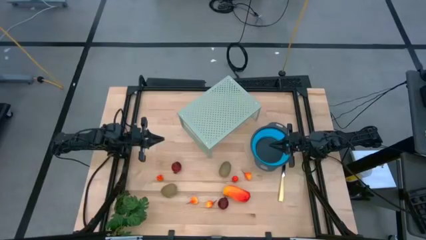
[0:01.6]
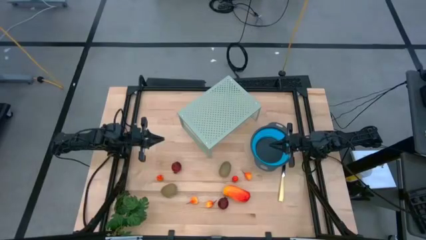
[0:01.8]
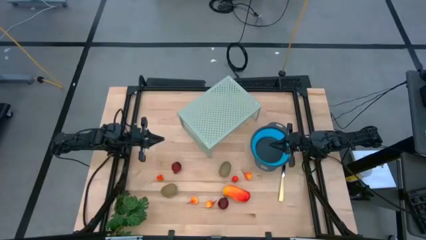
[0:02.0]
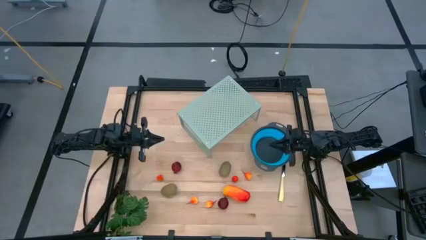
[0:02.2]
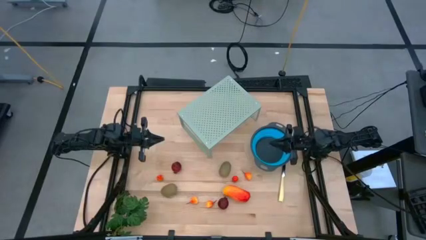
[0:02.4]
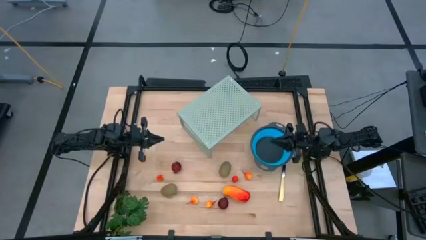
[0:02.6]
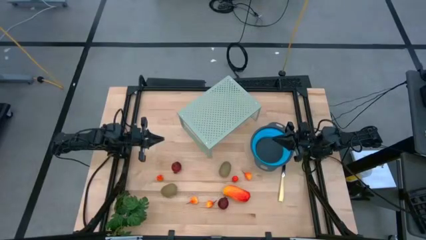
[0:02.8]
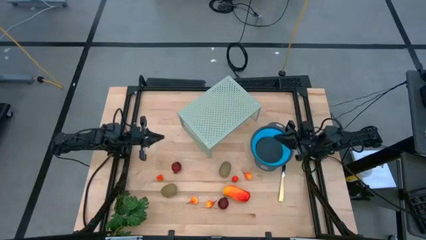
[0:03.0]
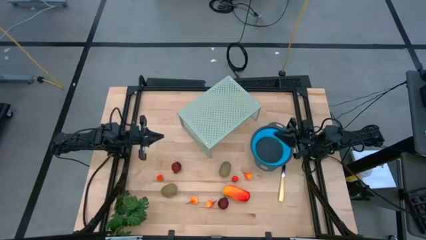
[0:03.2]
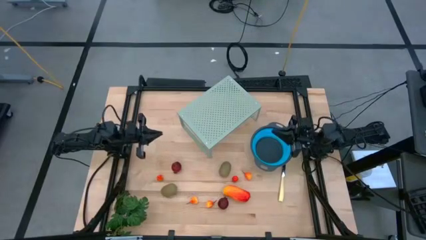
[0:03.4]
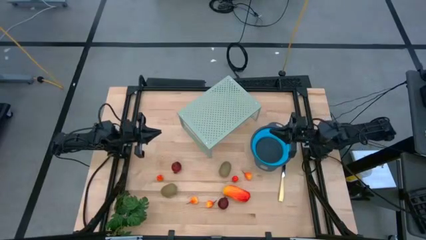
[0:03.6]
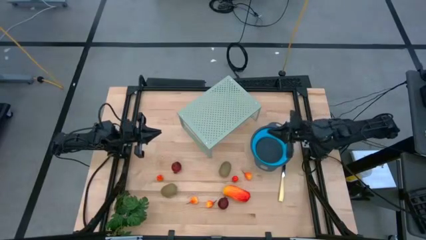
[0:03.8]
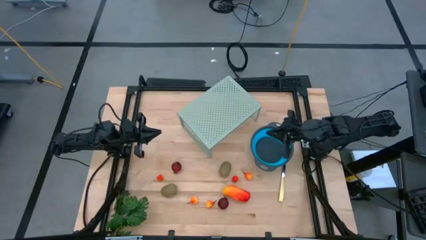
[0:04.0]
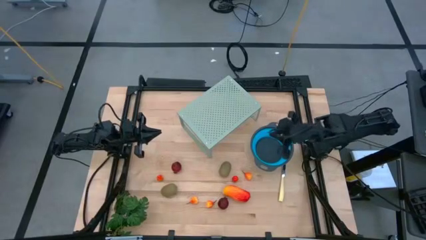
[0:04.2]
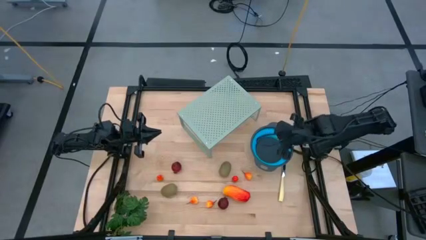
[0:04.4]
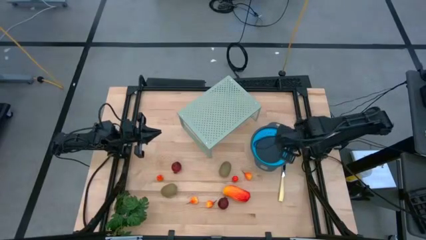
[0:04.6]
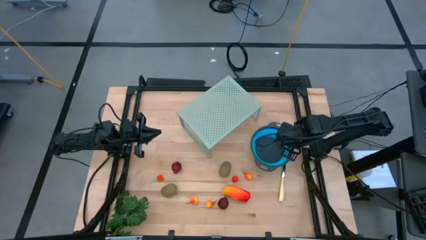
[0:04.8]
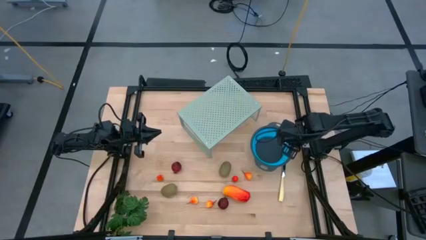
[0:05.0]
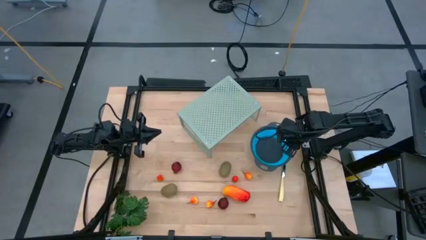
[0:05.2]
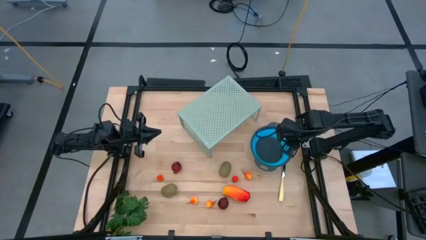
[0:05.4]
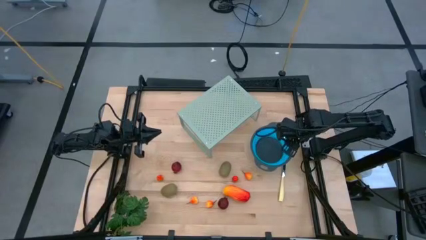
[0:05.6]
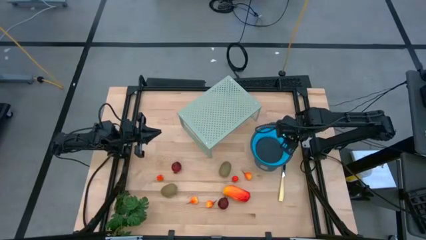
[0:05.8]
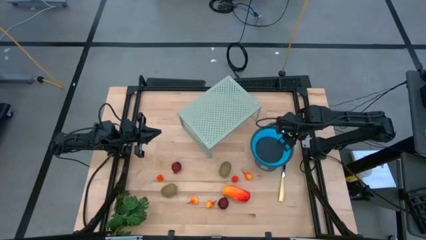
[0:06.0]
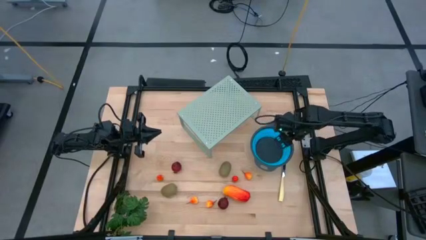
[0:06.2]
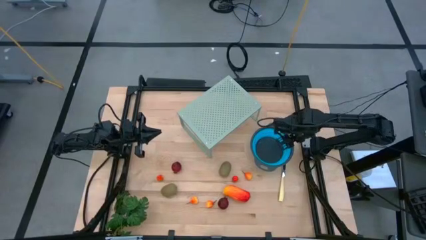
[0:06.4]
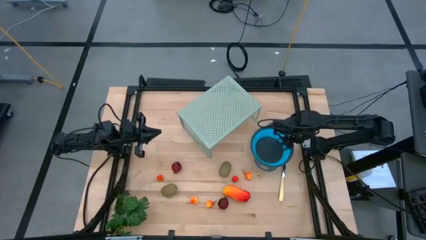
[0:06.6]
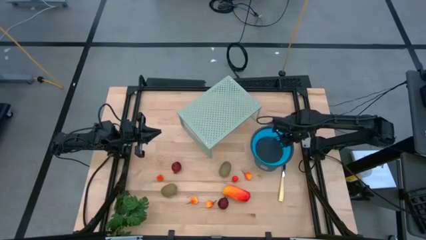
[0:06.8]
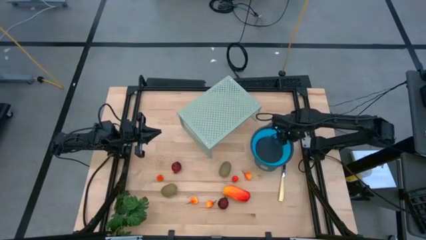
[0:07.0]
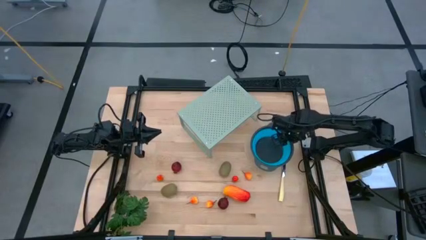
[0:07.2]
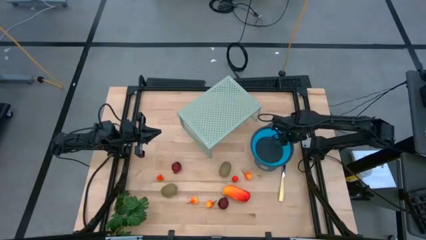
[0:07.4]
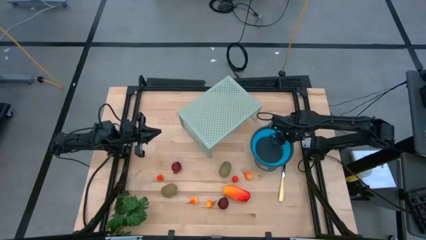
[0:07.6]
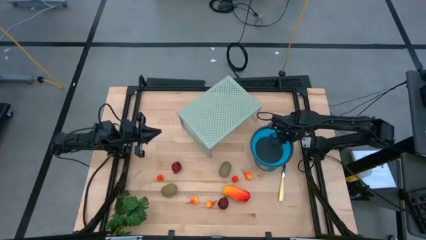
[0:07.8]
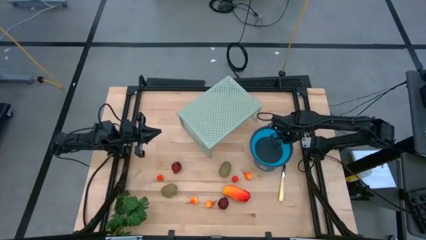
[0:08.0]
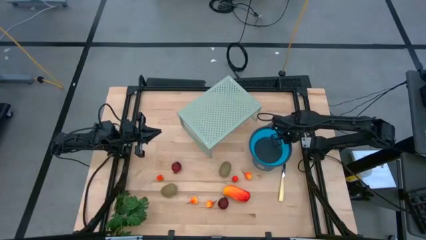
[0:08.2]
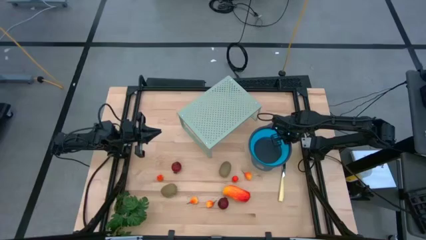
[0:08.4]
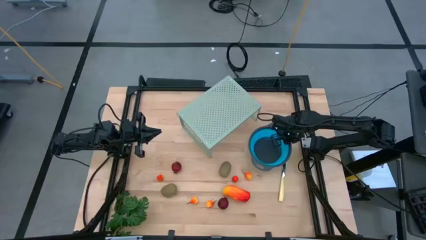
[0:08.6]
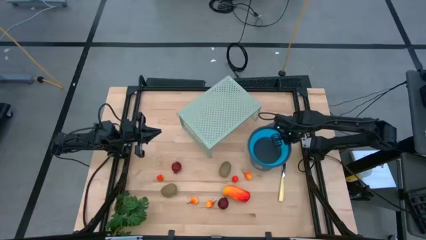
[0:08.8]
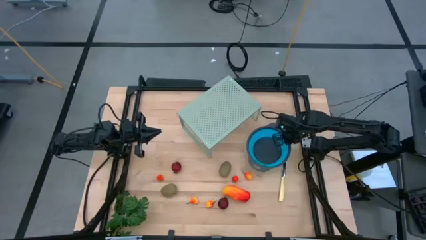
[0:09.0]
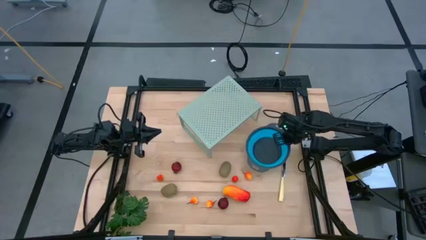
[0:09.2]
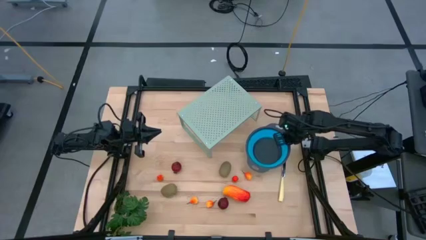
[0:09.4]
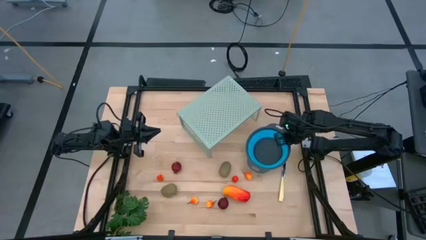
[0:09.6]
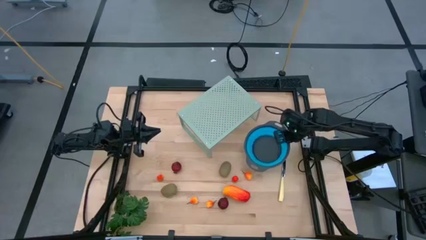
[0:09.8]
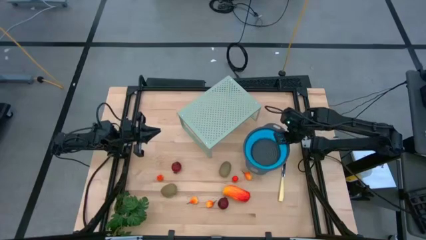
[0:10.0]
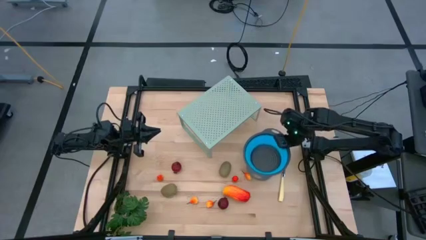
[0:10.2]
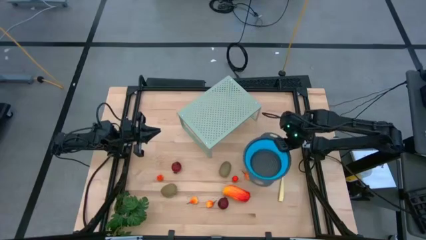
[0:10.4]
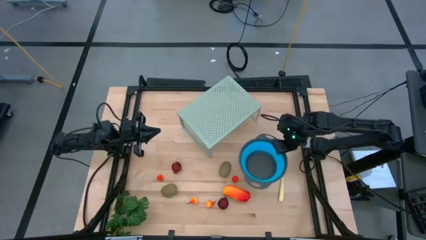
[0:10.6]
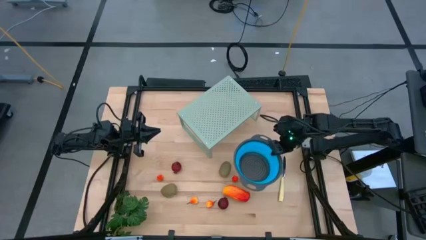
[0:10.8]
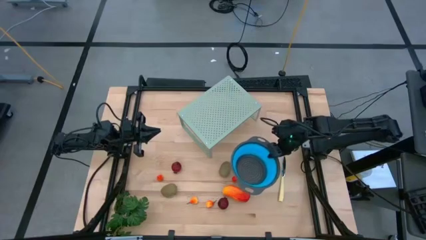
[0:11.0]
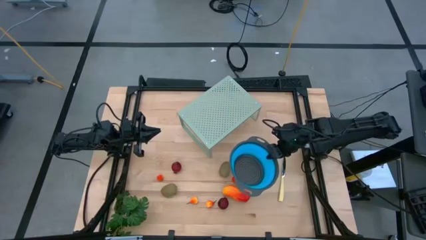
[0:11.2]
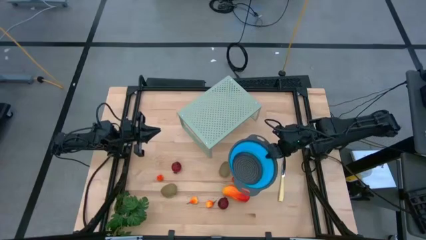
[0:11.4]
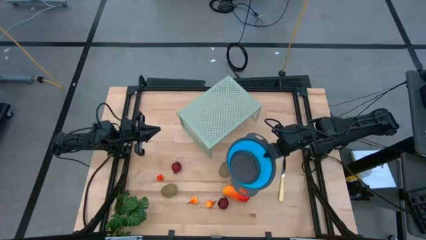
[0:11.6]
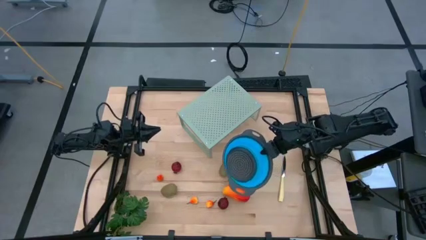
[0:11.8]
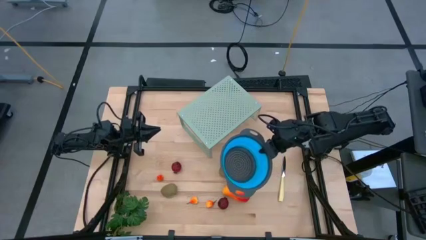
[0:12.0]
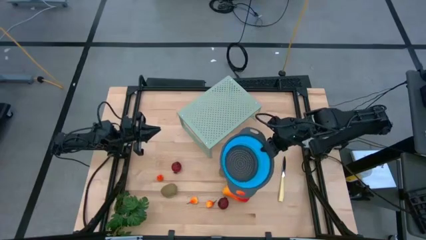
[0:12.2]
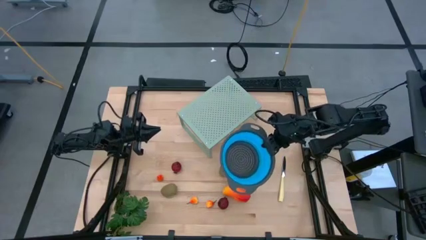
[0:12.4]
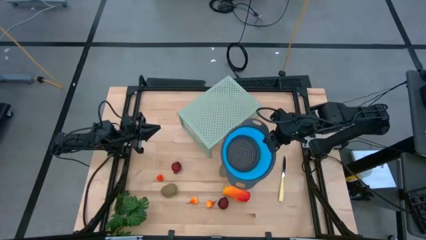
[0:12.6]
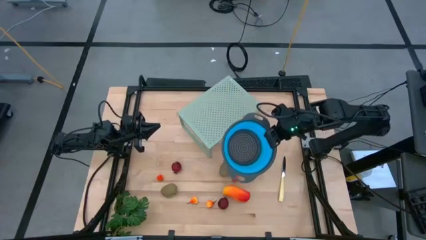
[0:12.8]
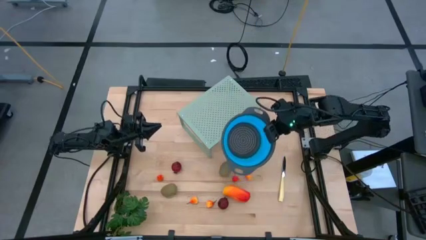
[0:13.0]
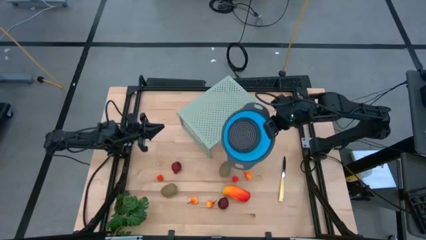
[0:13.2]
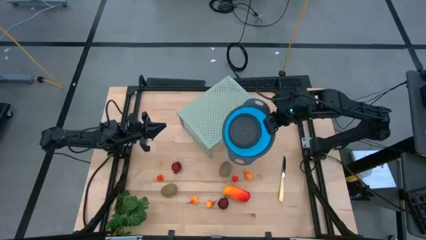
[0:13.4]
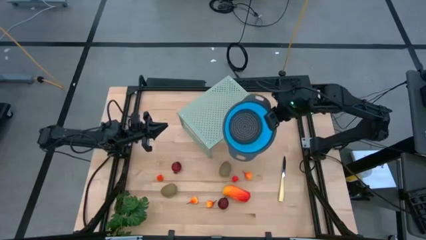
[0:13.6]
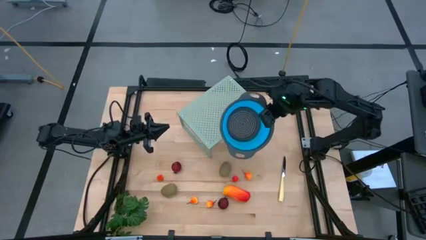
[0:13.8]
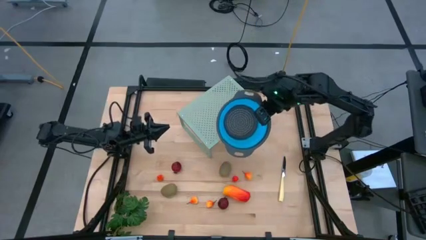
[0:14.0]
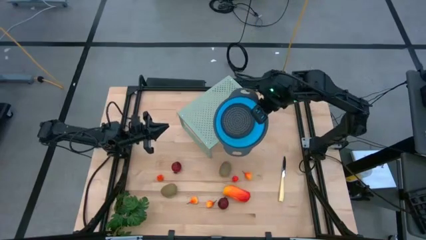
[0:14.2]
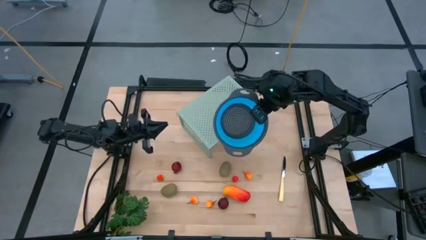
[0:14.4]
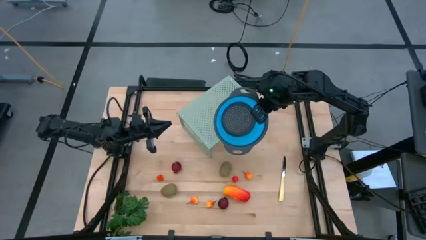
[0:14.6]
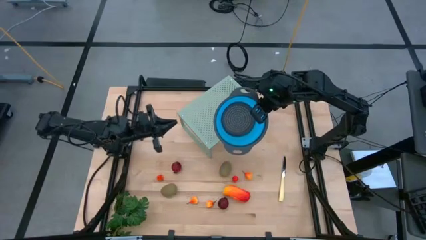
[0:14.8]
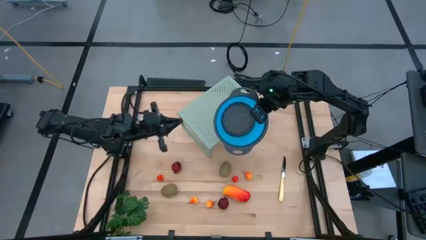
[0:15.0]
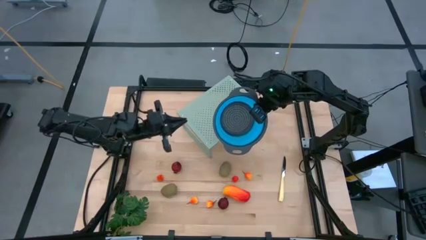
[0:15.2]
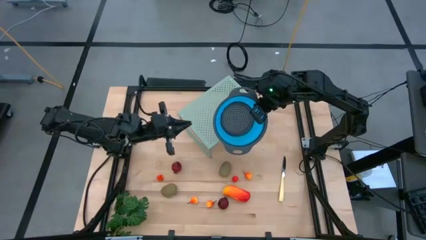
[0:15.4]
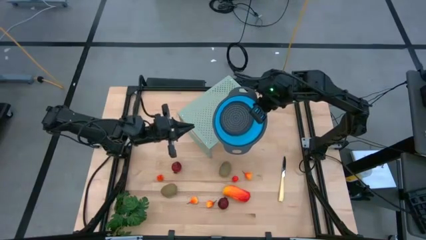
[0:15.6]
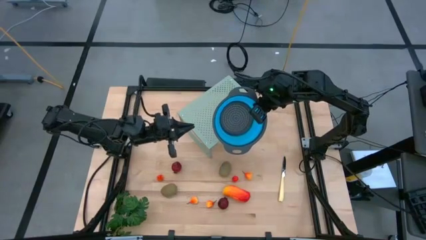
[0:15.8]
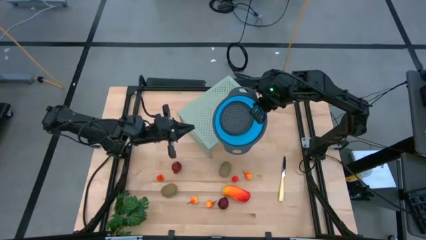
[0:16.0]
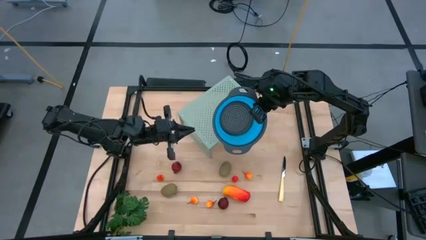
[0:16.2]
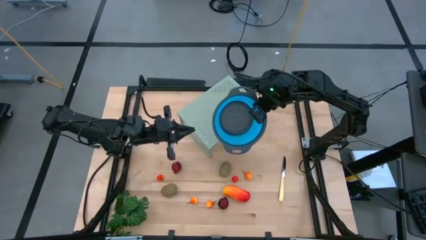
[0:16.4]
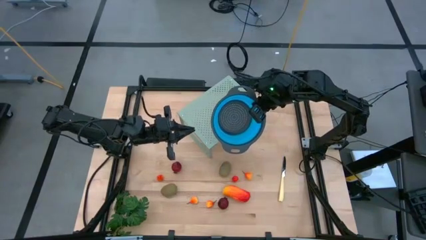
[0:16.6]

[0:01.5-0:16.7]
Task: Pick & Place Fruit
Put the blue strainer bowl on the shelf
